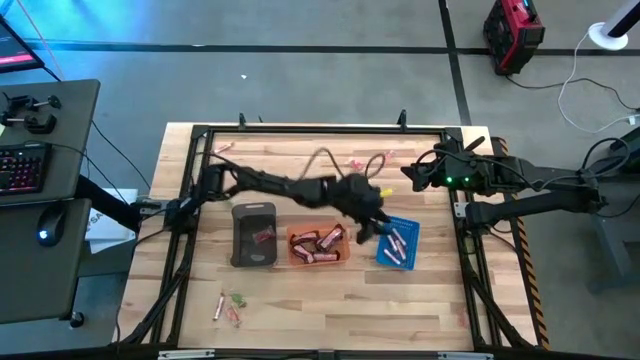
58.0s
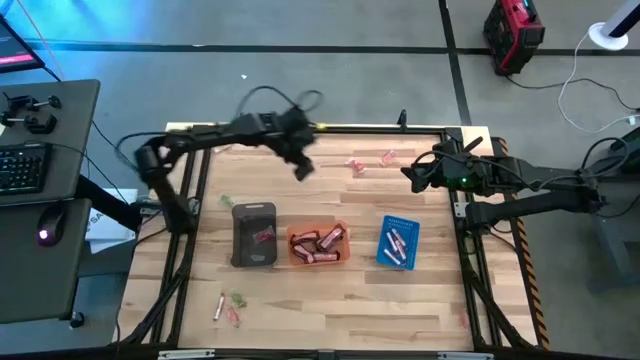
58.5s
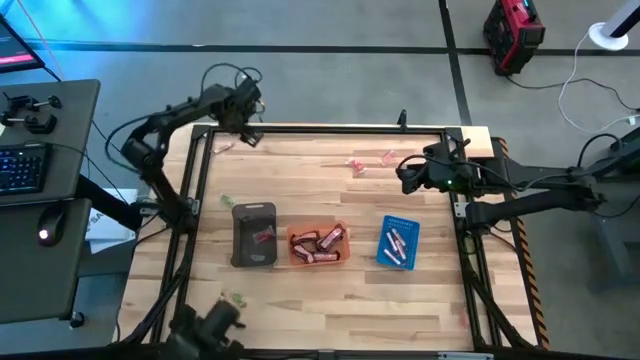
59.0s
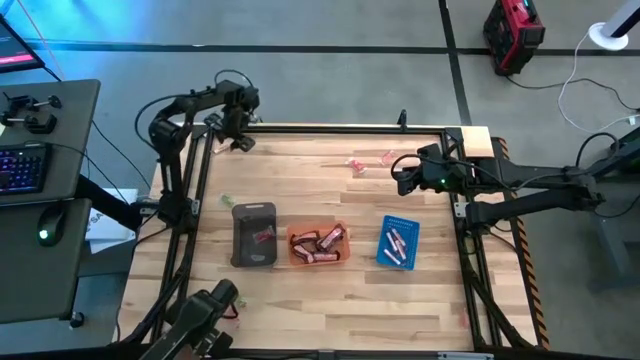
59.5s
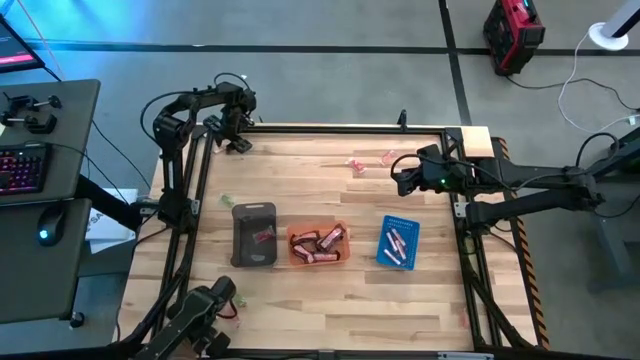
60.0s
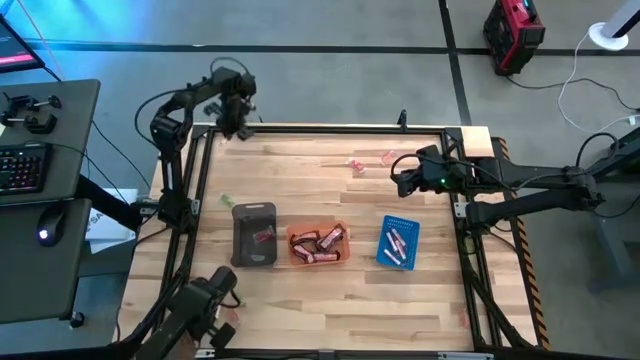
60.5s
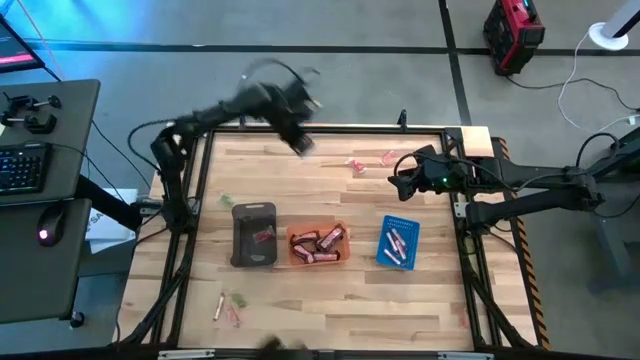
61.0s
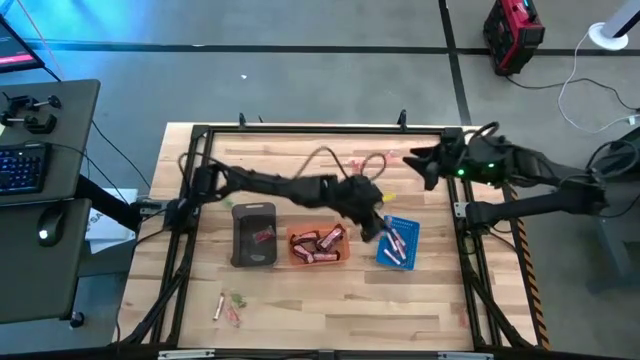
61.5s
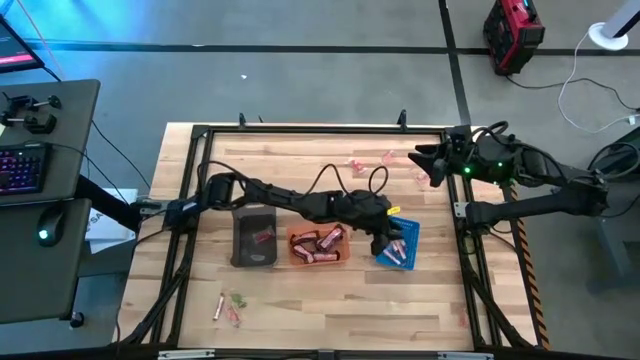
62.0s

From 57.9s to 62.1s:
Task: Sort candy by brand, put in halloween buckets
Put the white candy stick into the blue bin

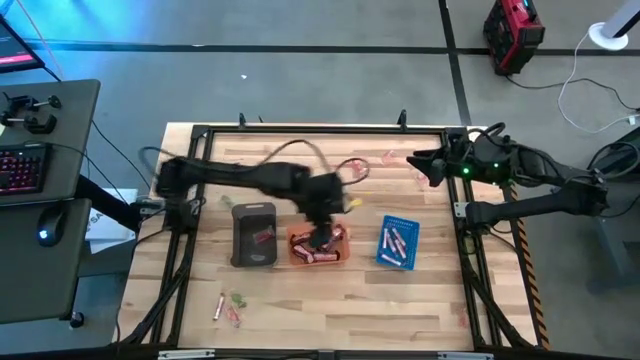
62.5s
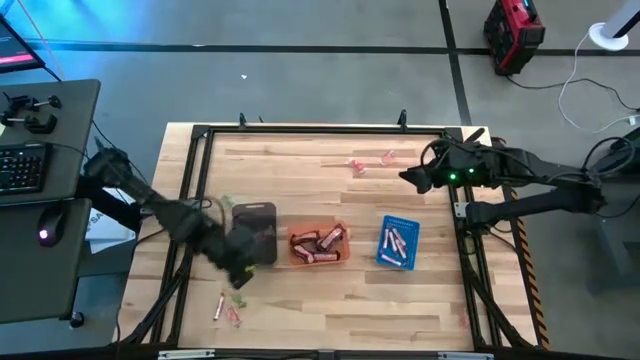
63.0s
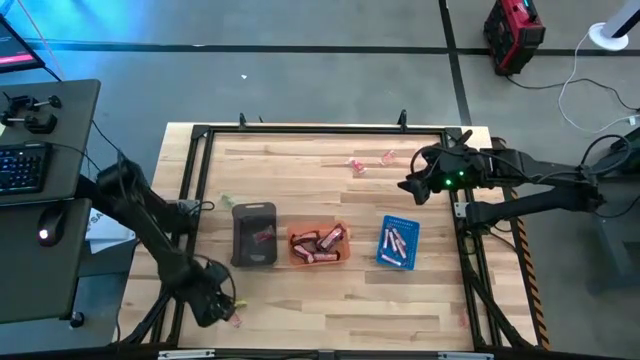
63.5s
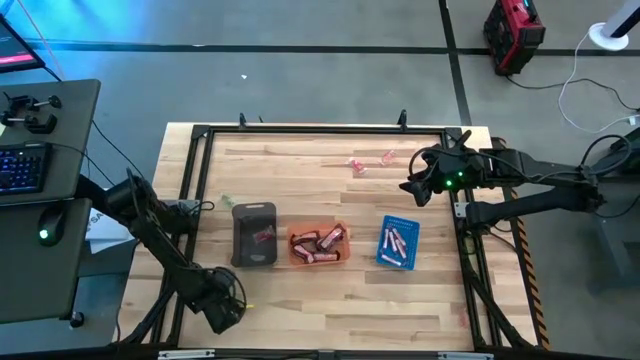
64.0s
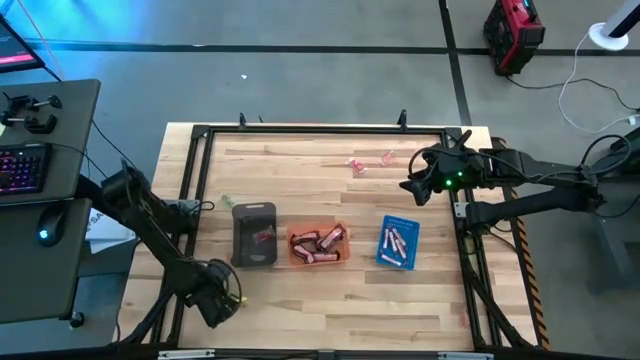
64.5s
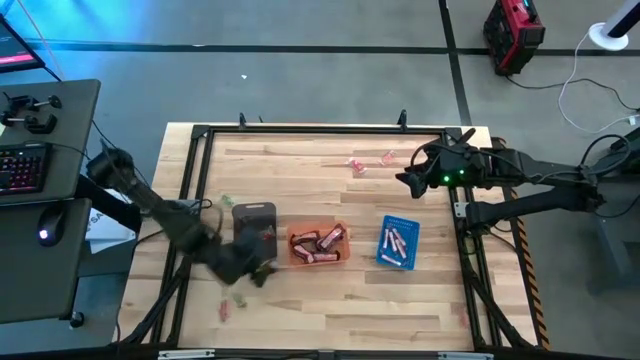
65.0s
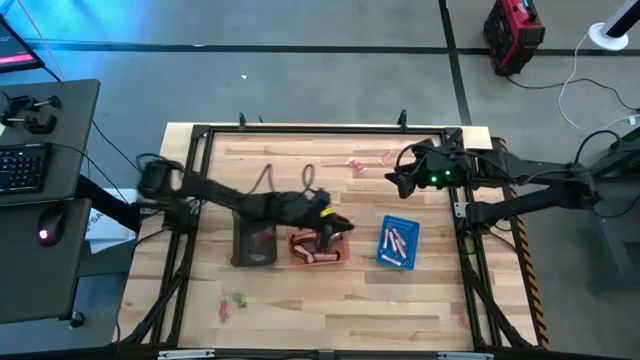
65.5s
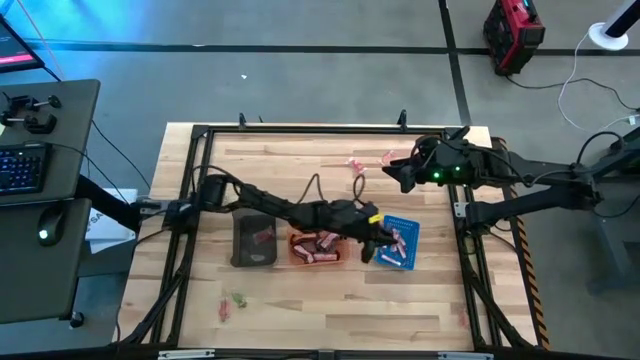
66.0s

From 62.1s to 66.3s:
Put the white candy stick into the blue bin

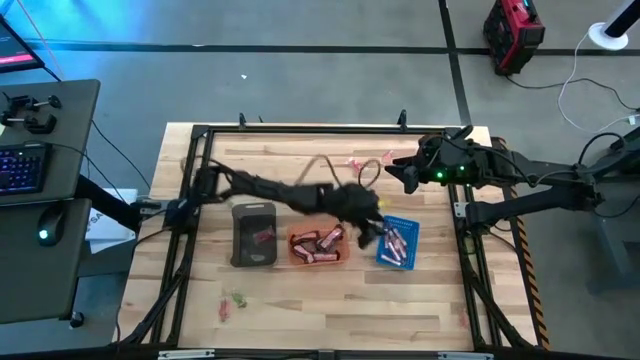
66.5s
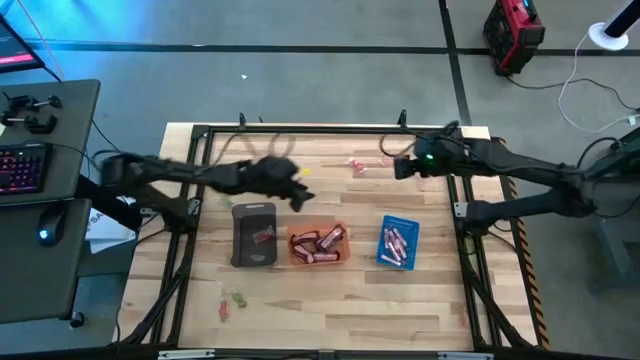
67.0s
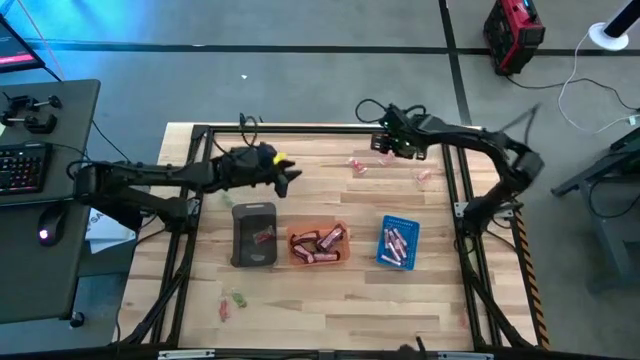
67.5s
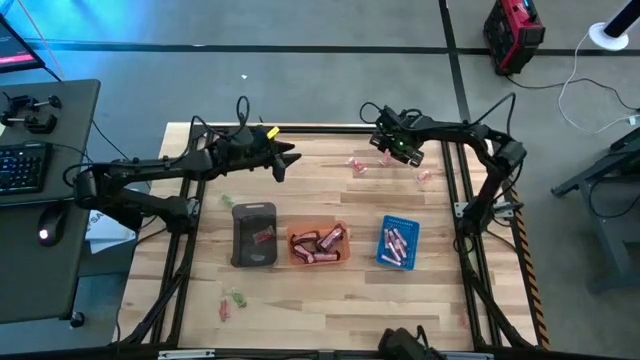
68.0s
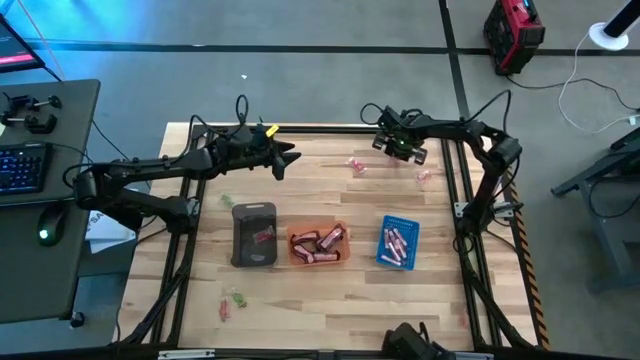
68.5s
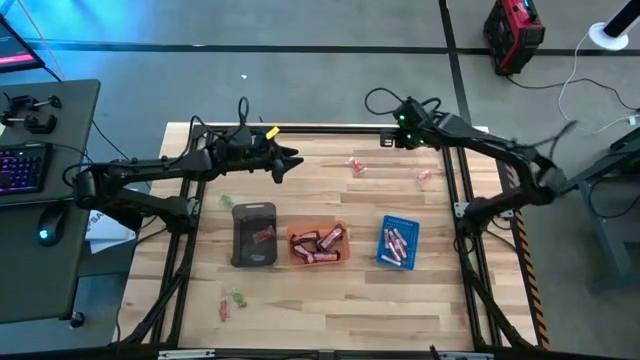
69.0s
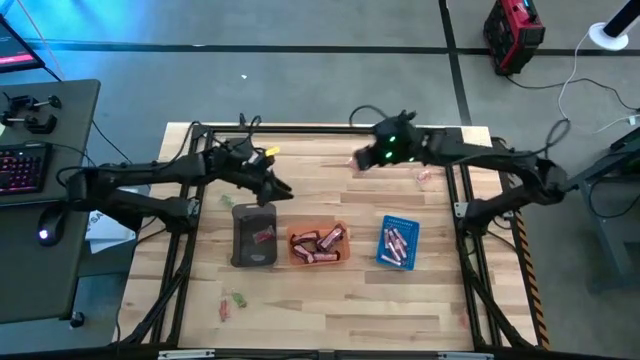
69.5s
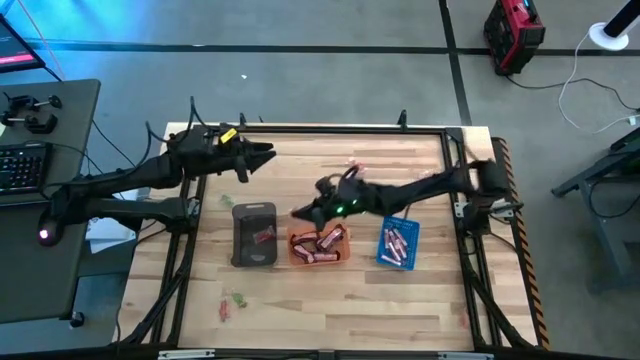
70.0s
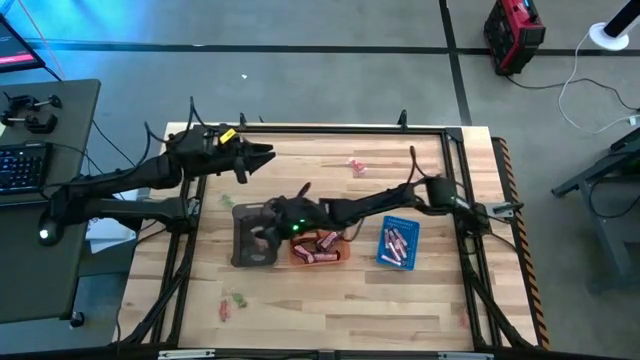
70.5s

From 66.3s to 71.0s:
Put the orange gummy into the black bin

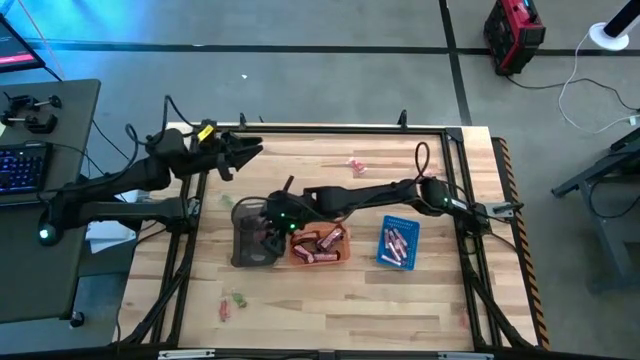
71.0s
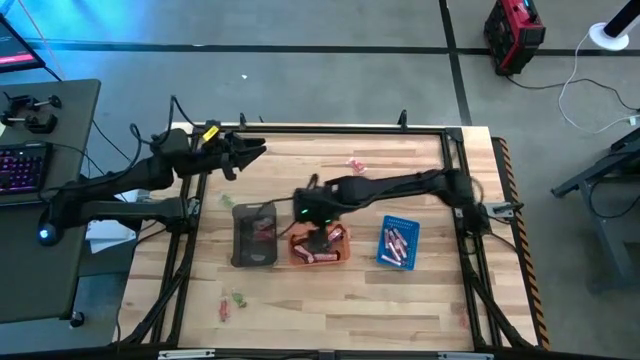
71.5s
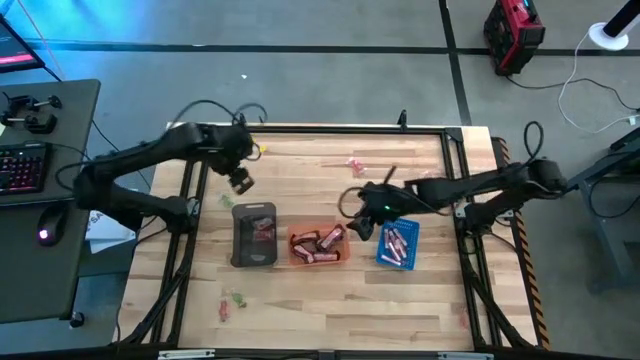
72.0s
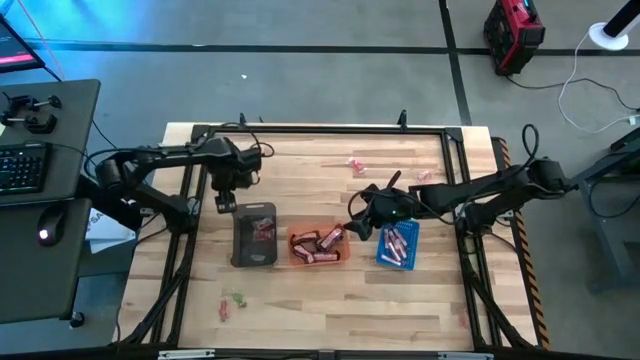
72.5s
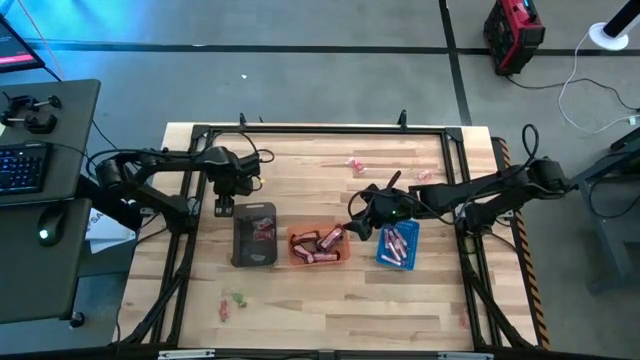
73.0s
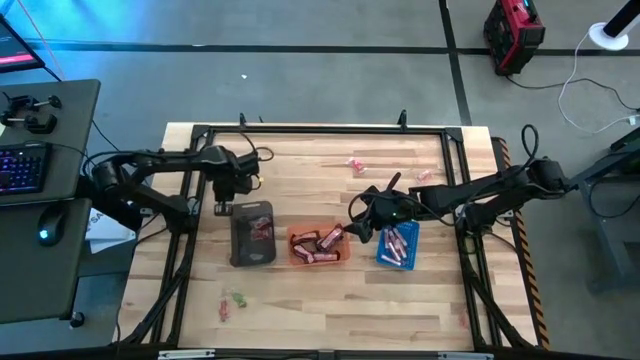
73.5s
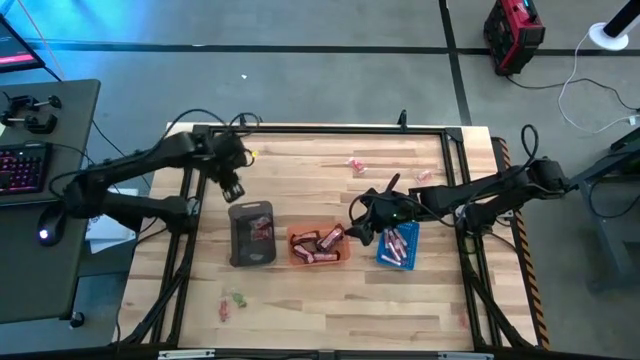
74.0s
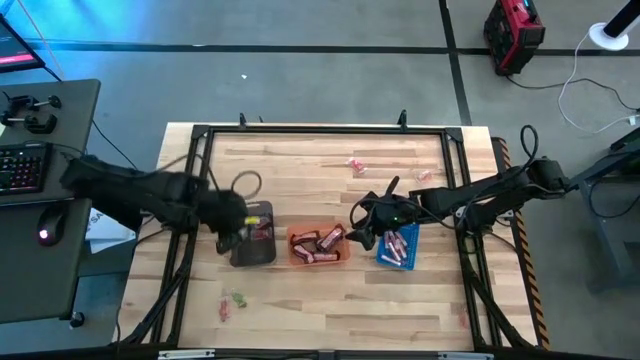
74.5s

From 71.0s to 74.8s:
Put the green gummy into the black bin

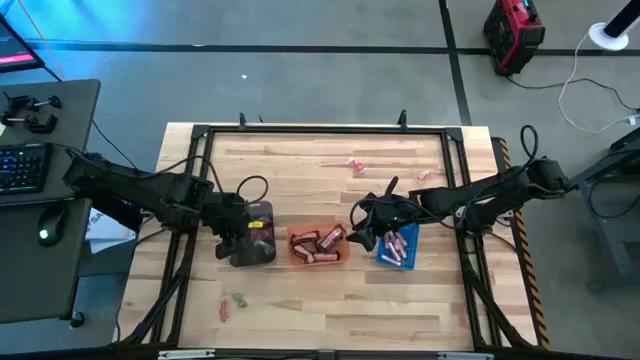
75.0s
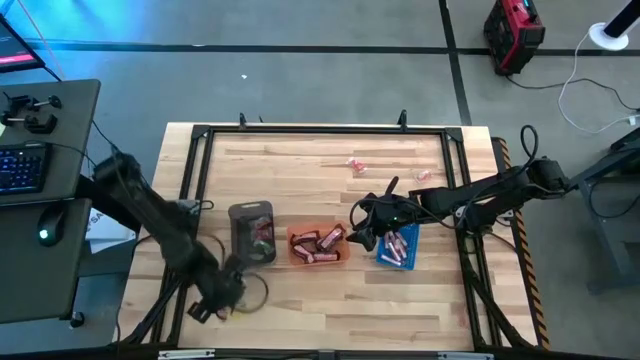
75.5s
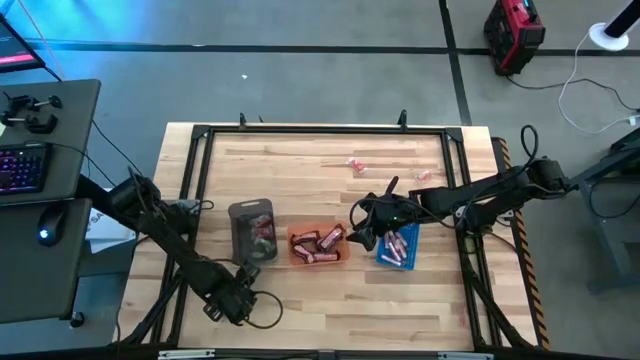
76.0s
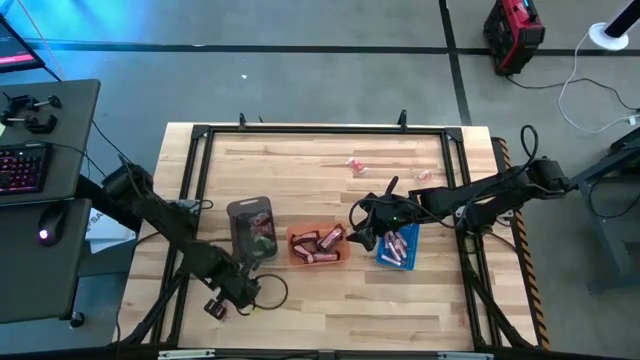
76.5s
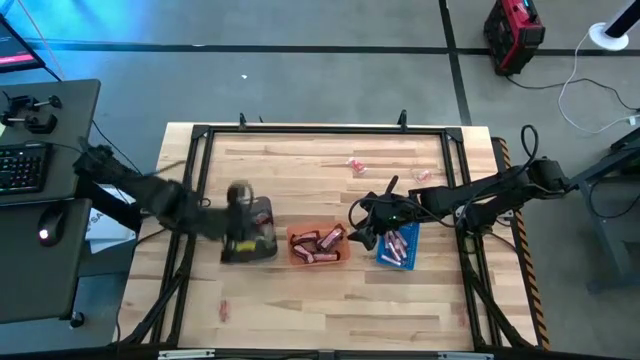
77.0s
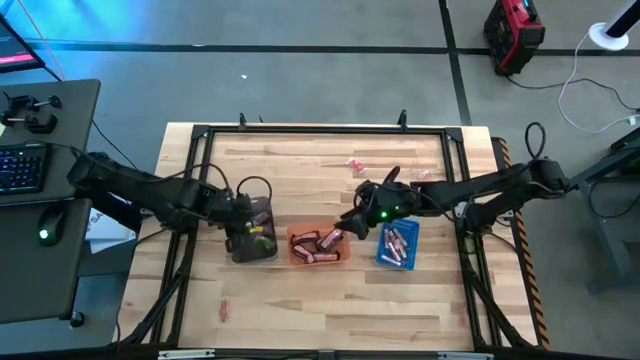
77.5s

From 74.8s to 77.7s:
Put the green gummy into the black bin

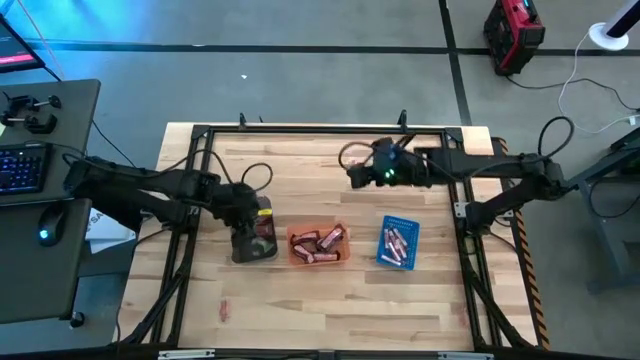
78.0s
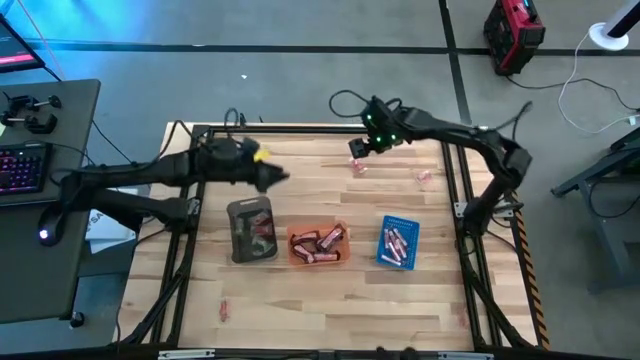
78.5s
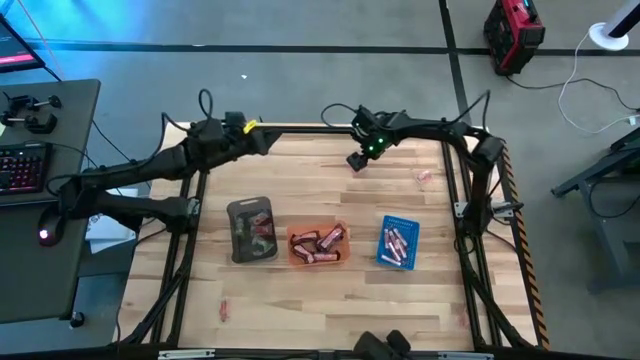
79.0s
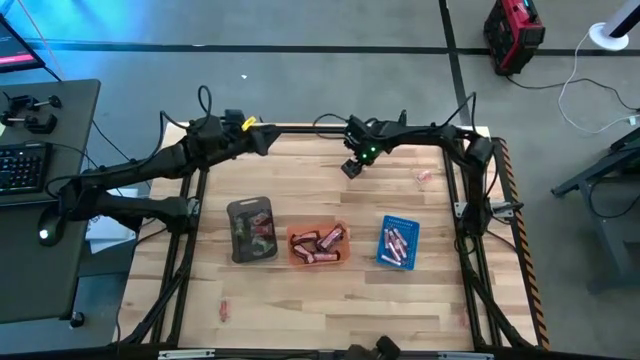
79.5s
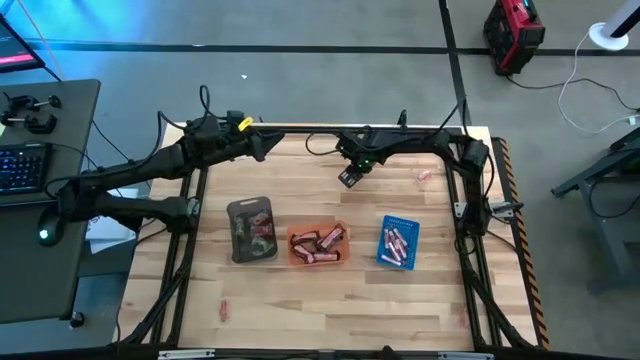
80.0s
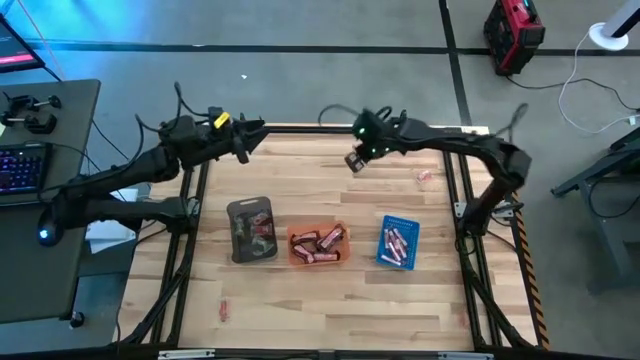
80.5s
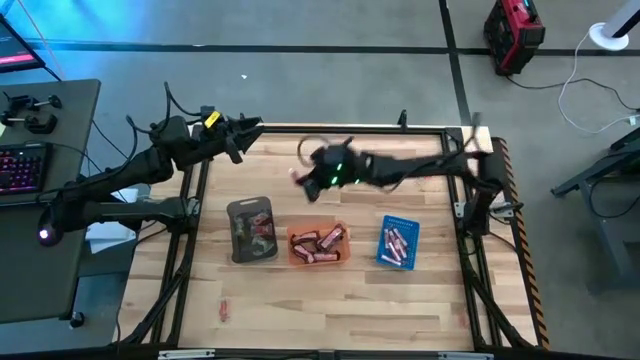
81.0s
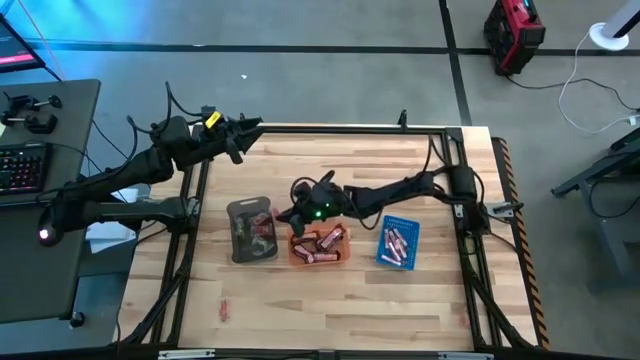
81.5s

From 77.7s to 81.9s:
Put the red gummy into the black bin
